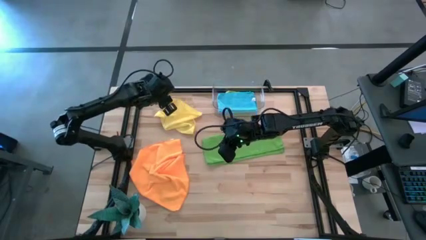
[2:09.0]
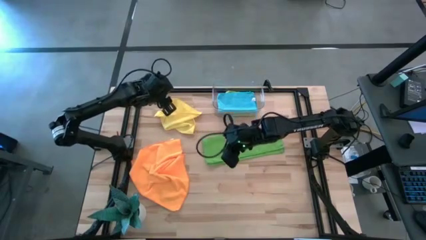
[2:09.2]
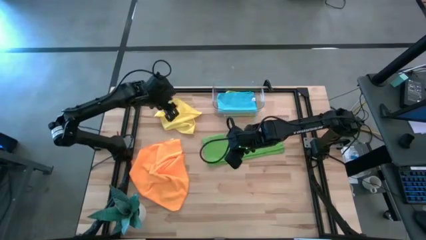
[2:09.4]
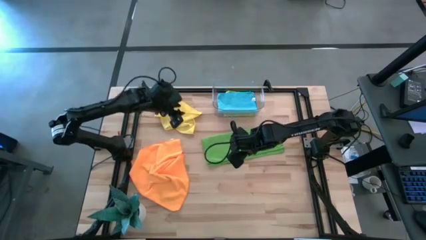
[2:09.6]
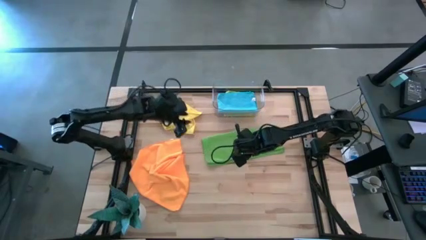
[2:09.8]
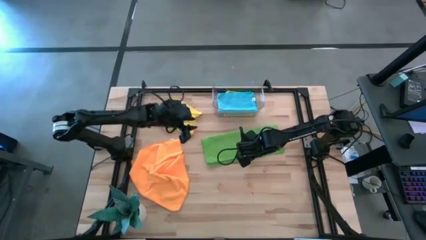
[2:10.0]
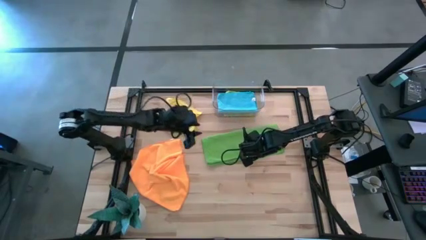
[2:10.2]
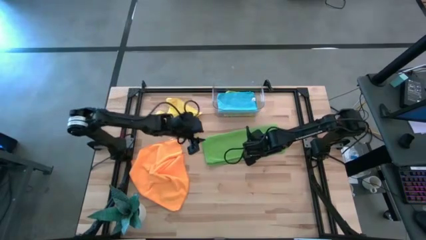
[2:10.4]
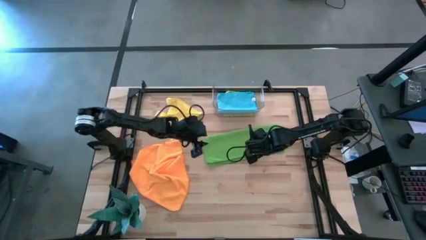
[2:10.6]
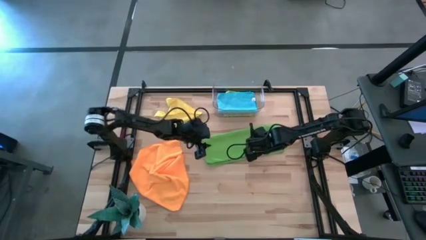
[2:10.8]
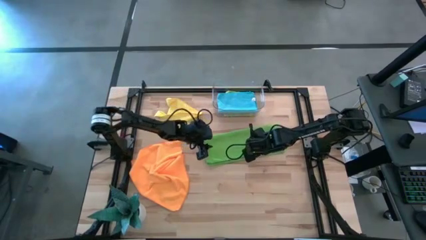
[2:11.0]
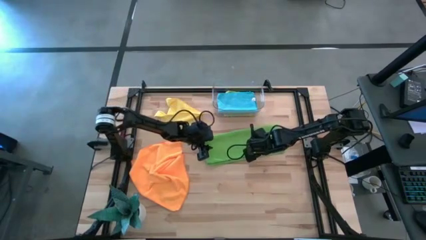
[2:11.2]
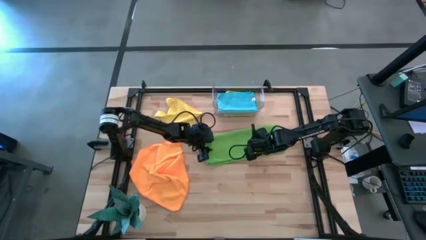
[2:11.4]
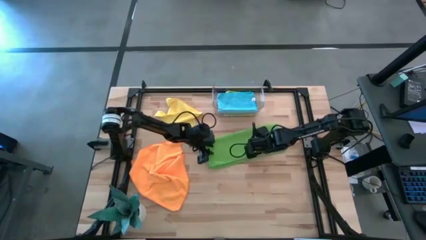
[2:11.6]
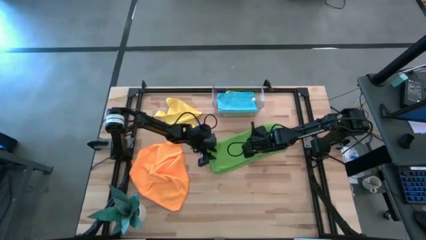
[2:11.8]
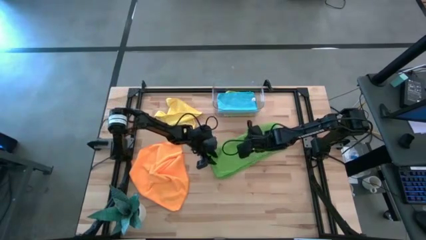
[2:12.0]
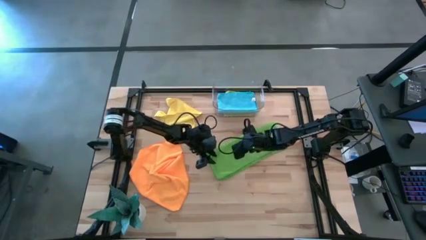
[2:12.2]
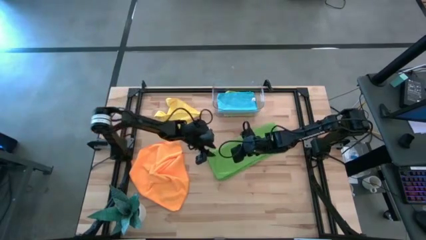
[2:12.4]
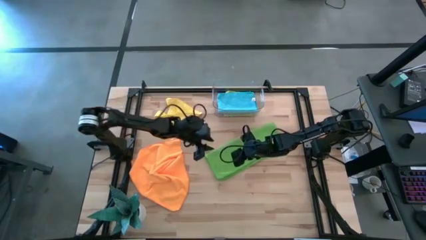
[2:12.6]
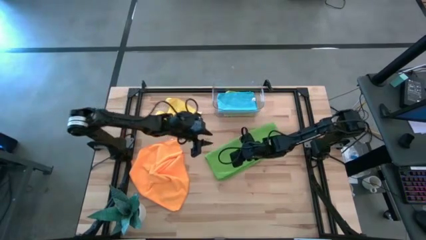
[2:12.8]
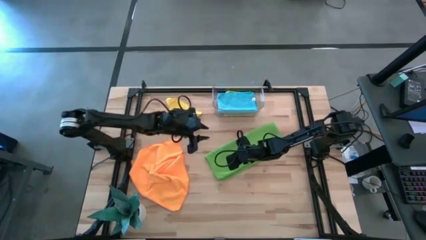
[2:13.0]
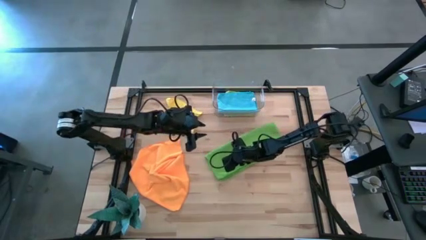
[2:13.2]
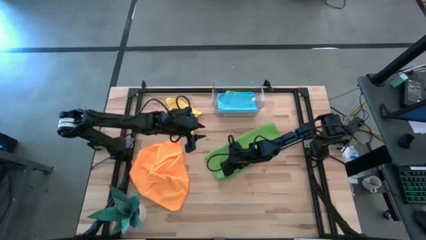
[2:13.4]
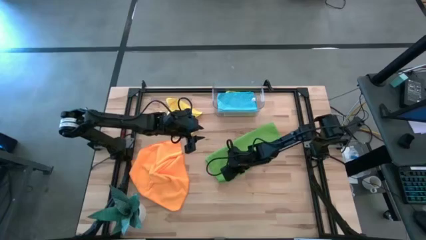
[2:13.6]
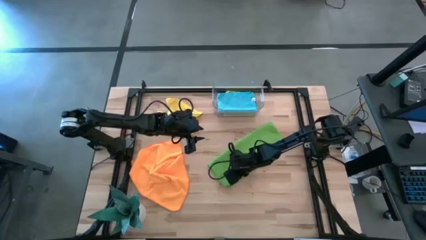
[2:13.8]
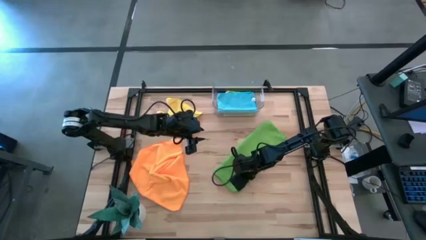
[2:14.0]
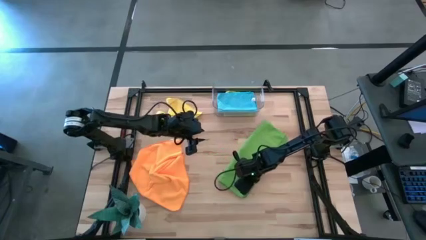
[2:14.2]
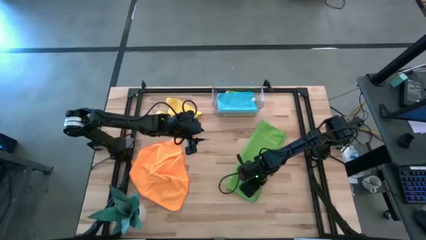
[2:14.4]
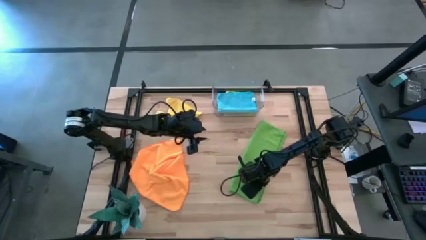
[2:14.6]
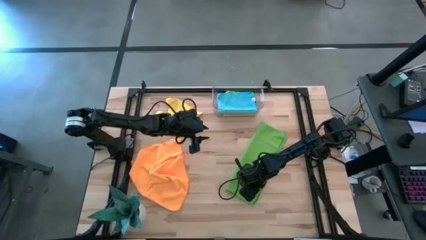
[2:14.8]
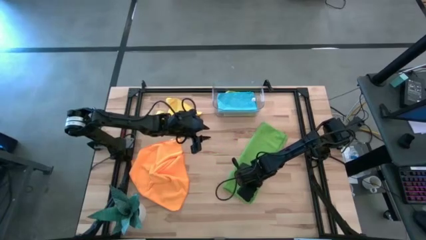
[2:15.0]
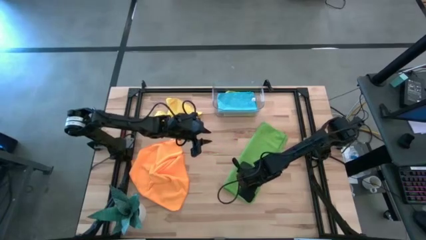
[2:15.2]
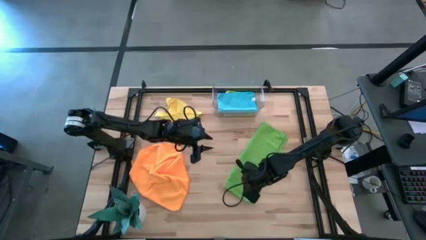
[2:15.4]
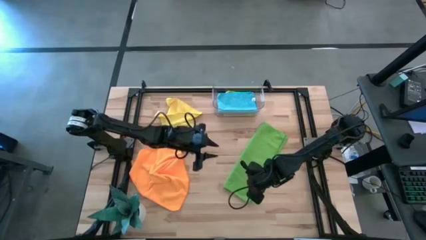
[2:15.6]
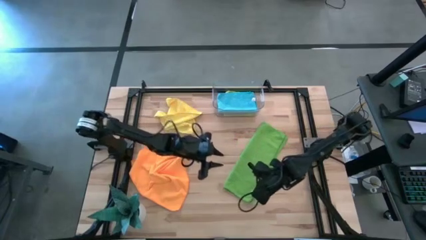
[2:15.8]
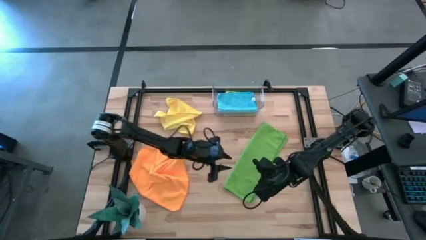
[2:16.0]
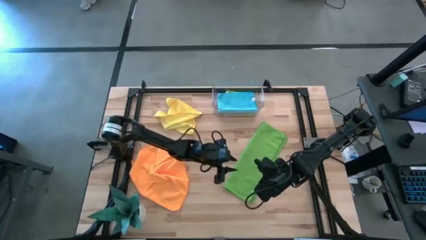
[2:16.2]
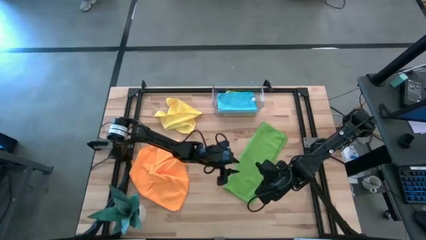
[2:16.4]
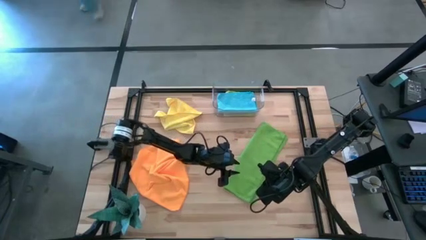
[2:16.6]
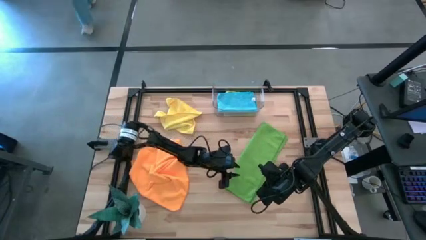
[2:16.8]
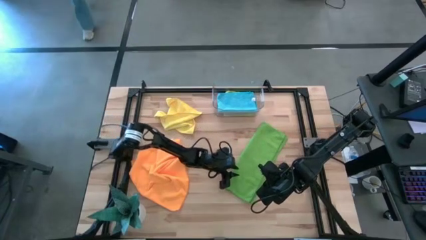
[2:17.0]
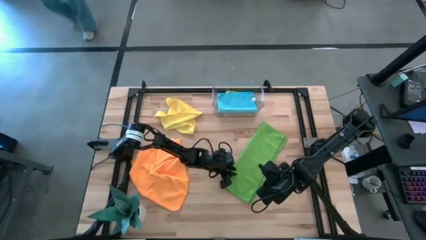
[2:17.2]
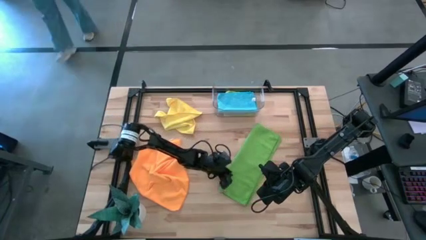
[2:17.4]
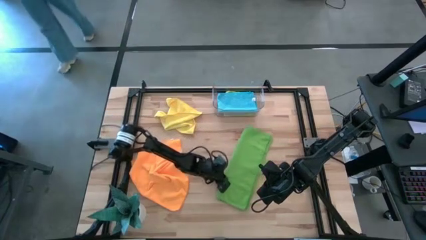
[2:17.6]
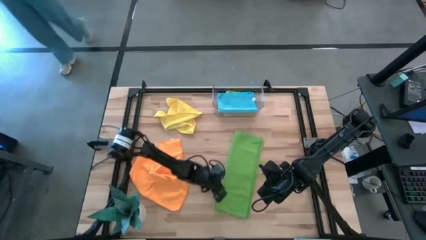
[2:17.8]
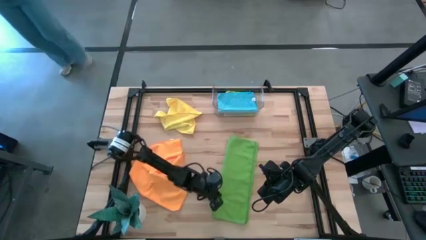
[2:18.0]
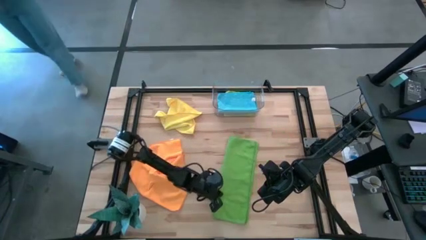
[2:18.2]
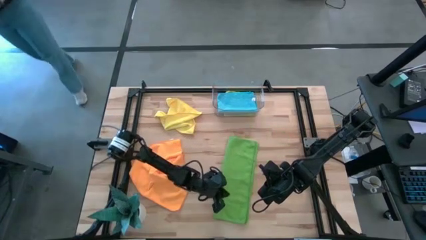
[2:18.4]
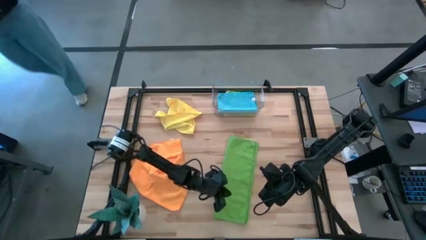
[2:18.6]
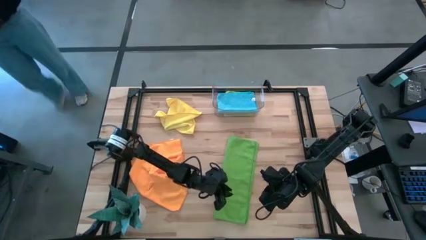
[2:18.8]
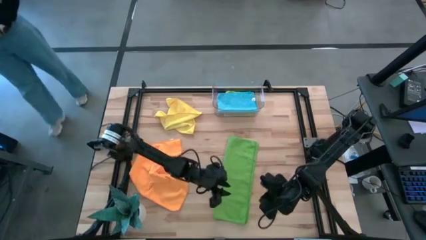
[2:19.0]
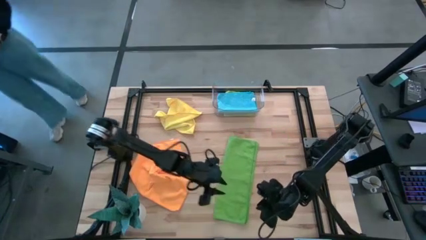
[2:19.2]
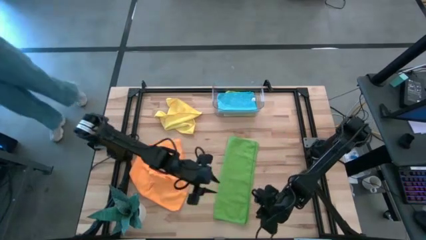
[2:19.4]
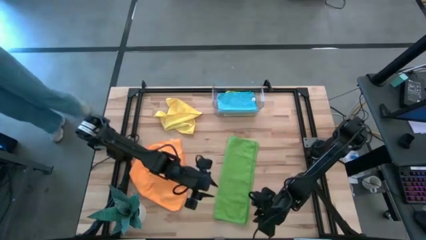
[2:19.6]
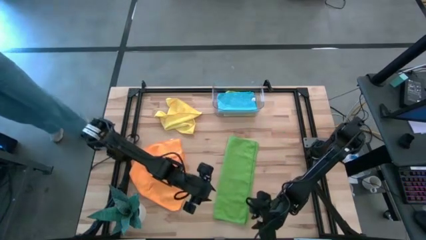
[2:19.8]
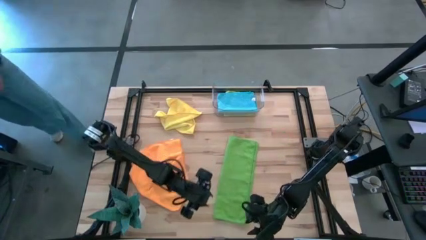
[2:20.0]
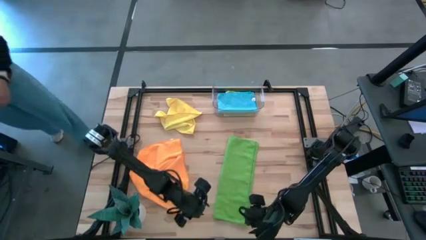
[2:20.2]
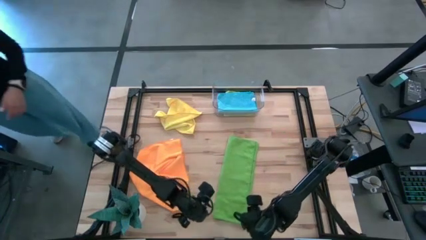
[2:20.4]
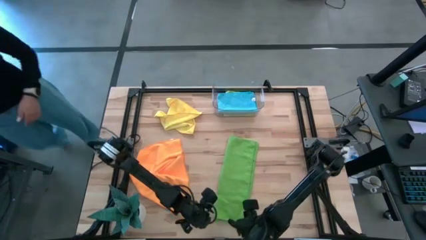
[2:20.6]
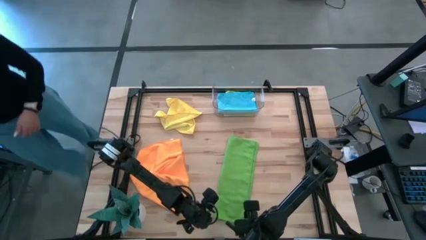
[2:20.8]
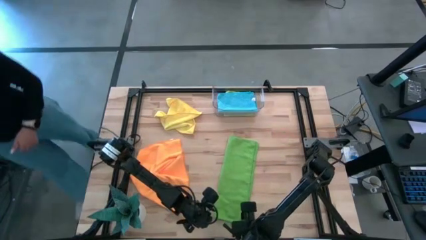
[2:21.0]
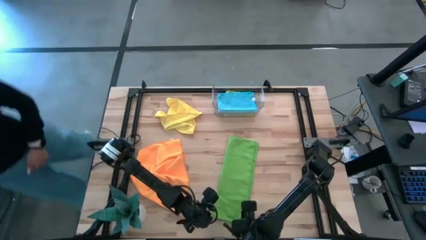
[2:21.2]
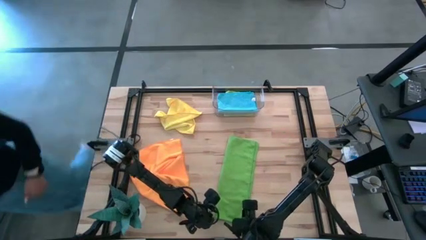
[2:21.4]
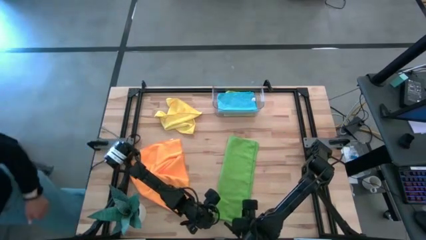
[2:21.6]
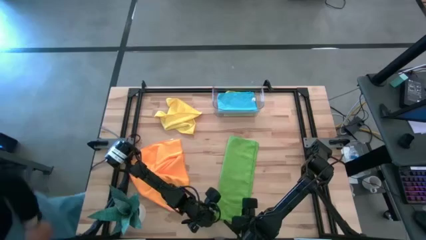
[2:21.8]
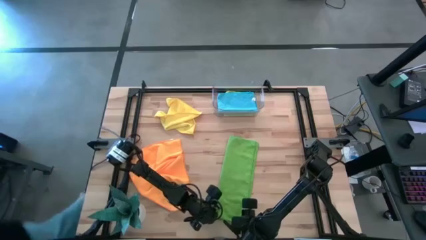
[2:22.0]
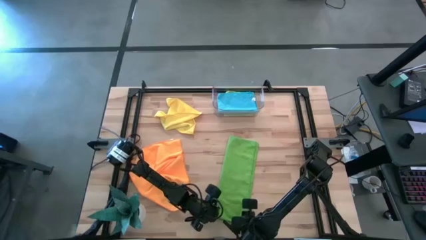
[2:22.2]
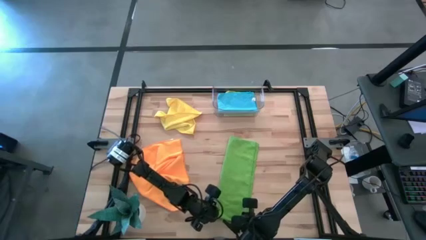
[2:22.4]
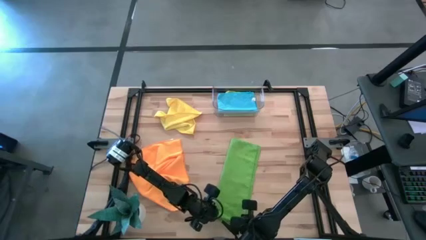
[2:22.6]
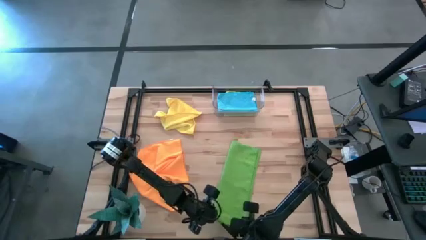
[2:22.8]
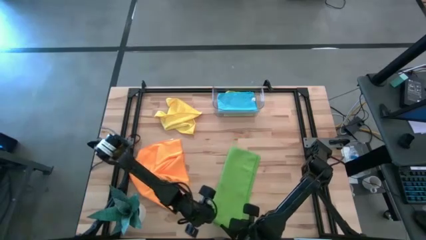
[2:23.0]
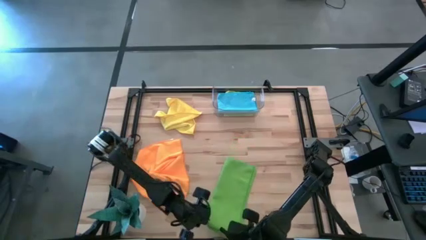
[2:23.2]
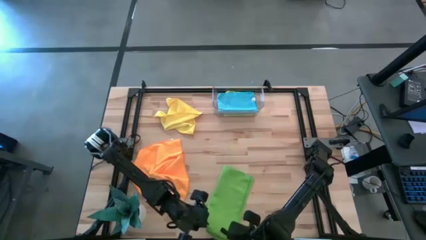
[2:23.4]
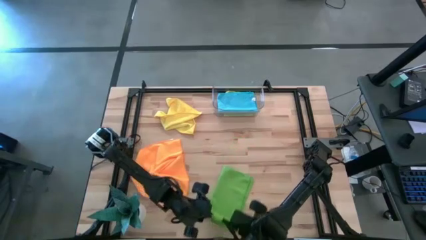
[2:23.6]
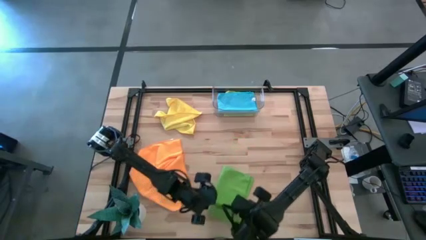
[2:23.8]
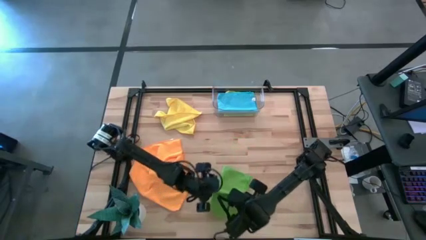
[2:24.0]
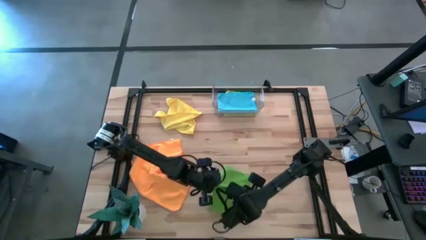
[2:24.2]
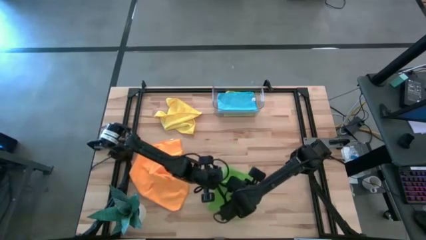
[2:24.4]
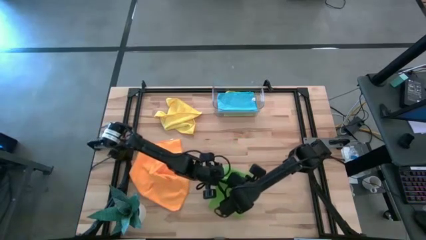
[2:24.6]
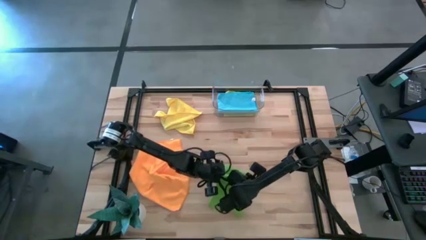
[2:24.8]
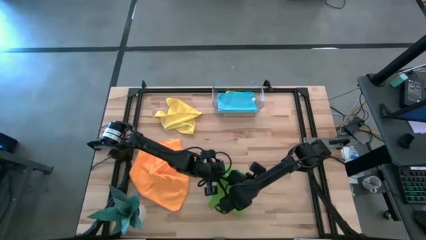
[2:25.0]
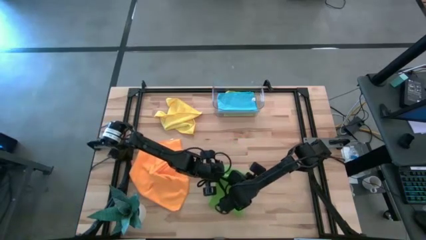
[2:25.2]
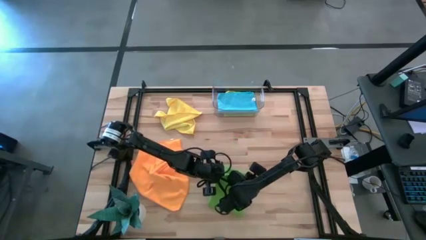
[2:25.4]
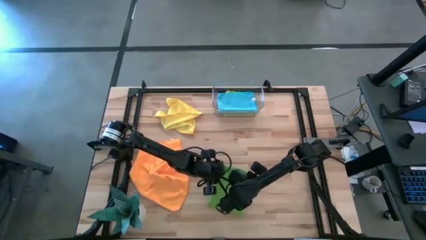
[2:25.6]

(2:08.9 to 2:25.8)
Task: Fold microfiber towels
Fold the green microfiber cloth

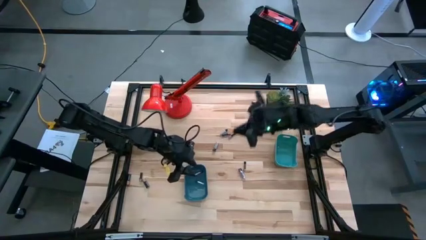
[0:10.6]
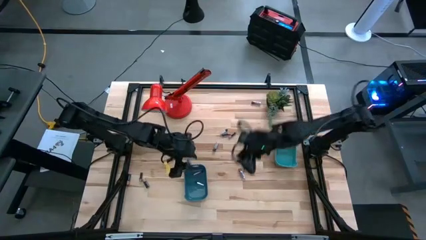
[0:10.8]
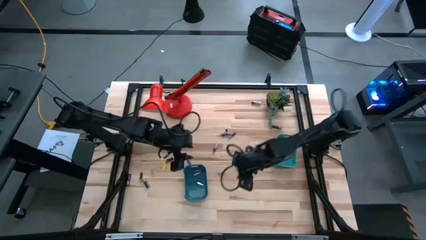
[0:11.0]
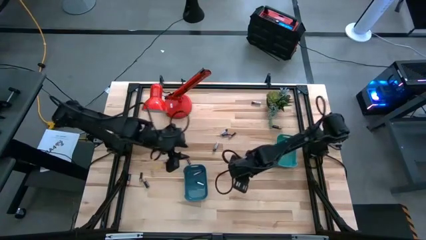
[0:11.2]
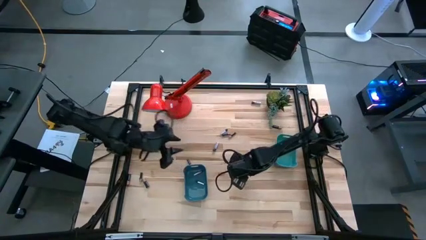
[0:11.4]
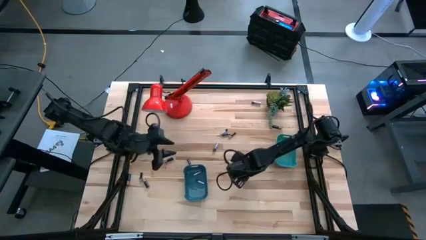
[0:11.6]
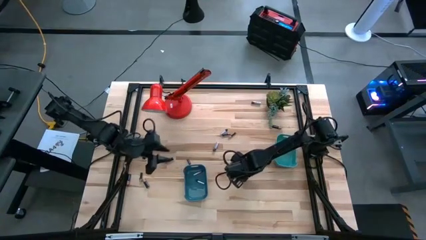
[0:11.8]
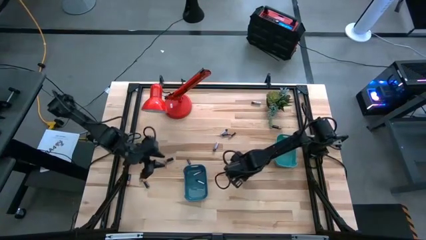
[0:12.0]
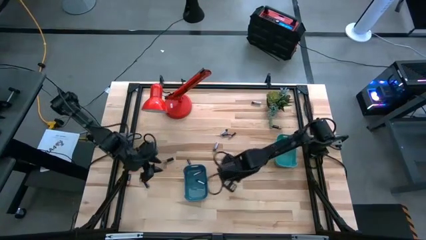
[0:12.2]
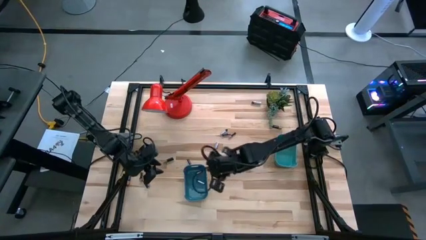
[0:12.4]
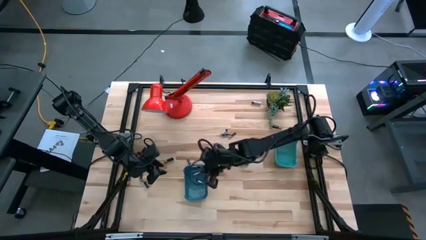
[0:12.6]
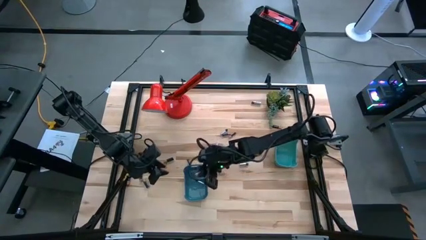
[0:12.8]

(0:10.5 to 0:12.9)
Task: Sort batteries
Put the silver battery into the blue bin
